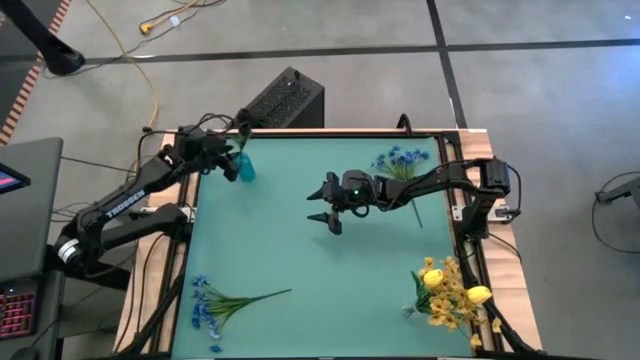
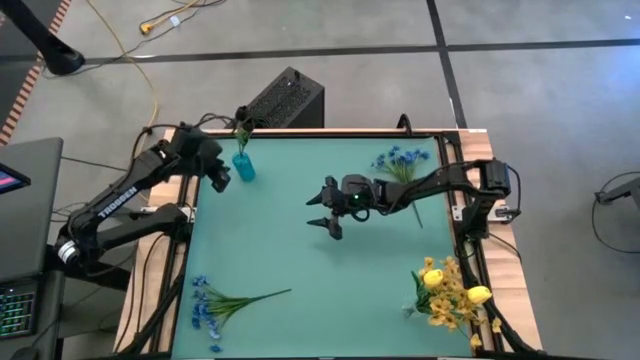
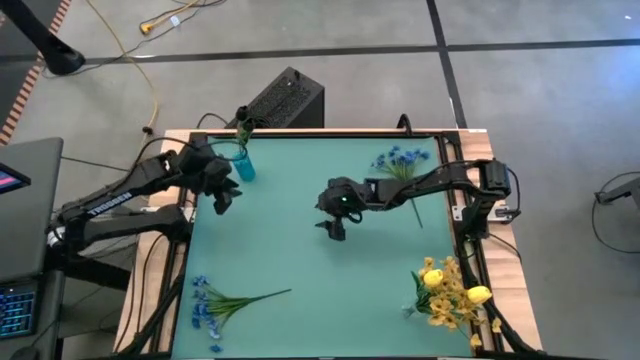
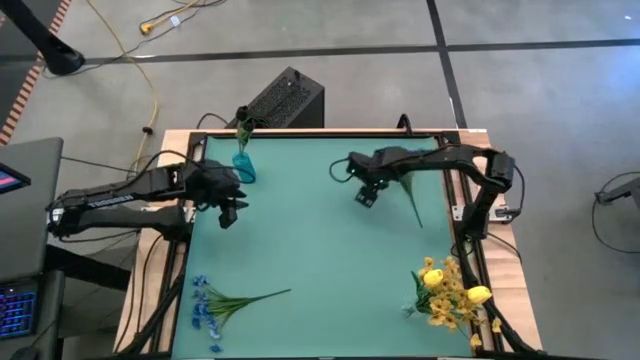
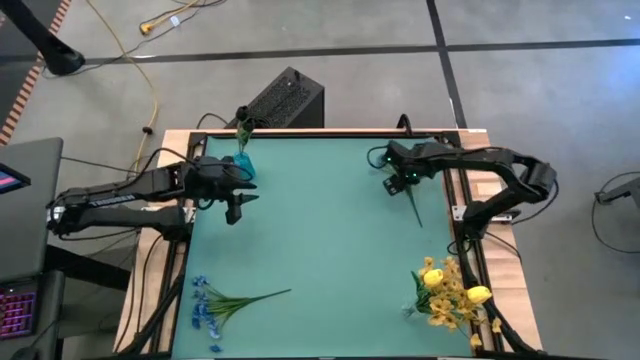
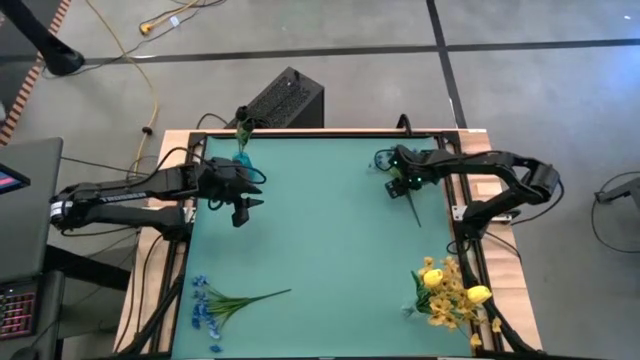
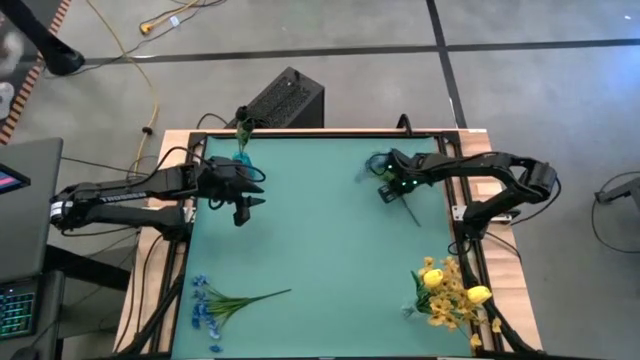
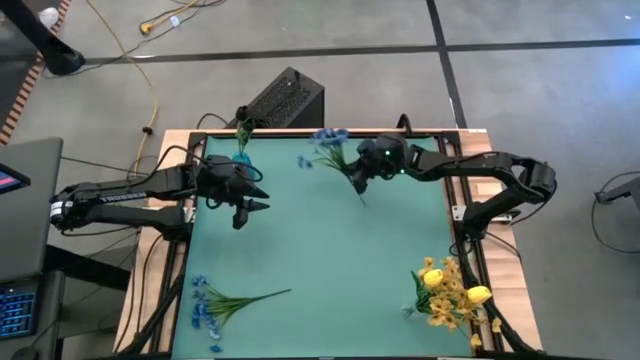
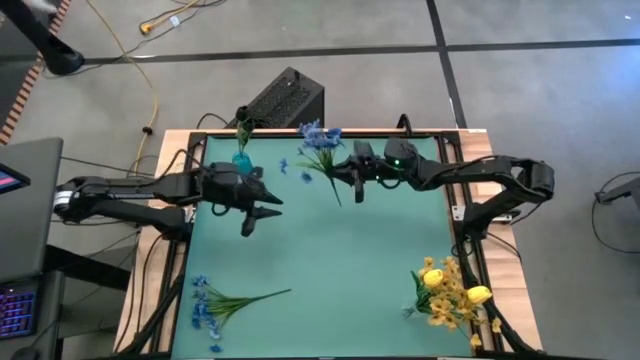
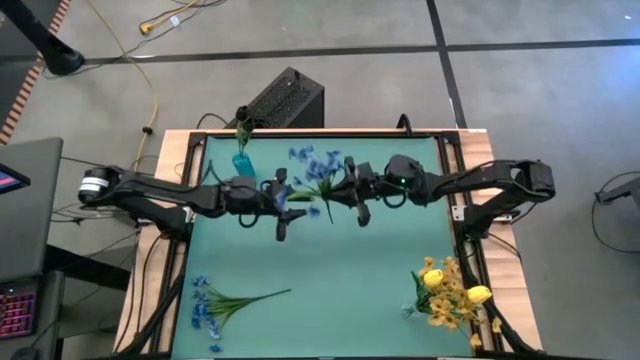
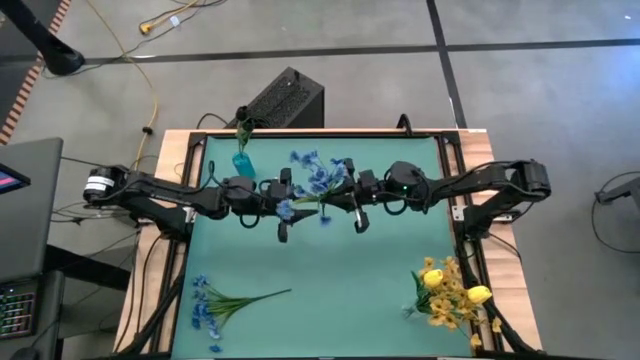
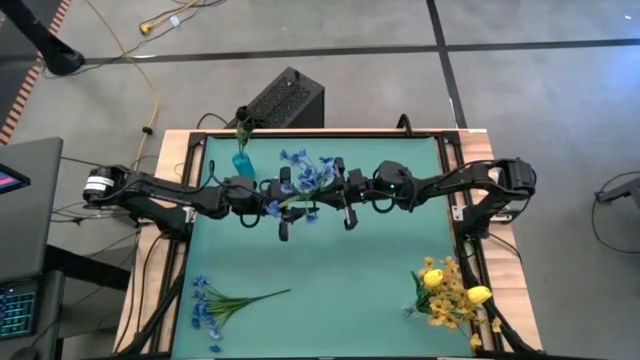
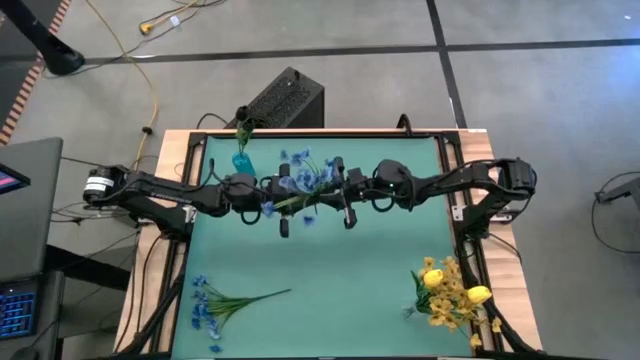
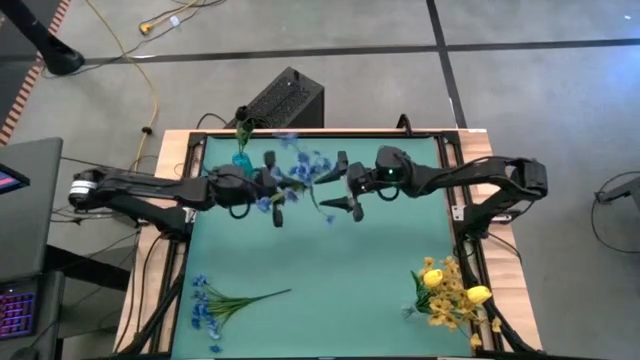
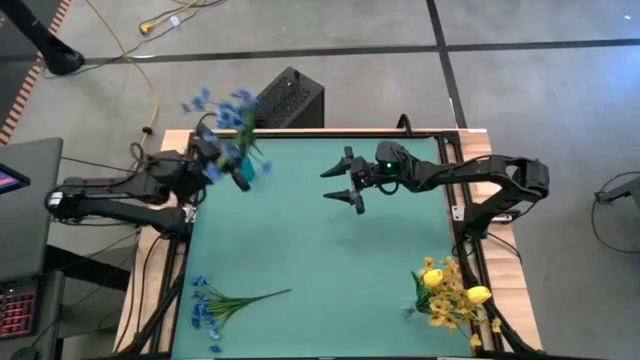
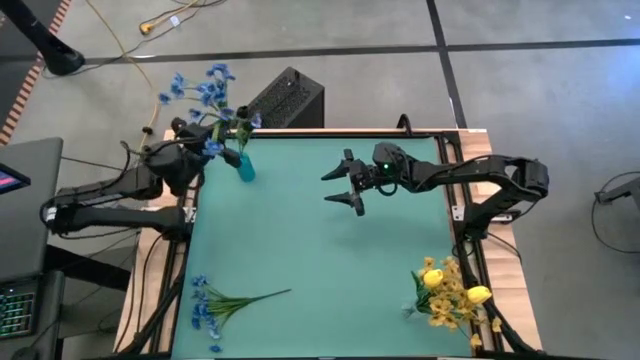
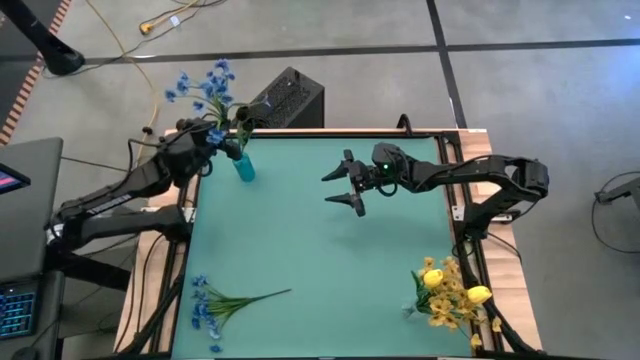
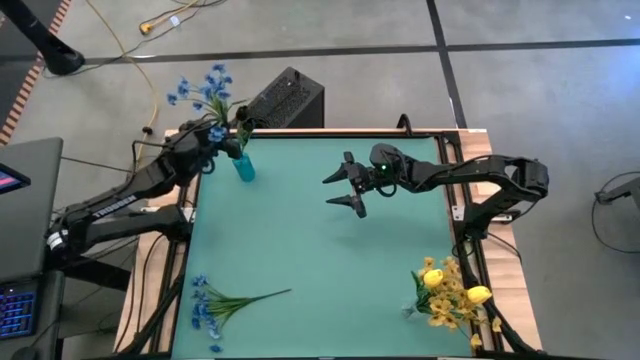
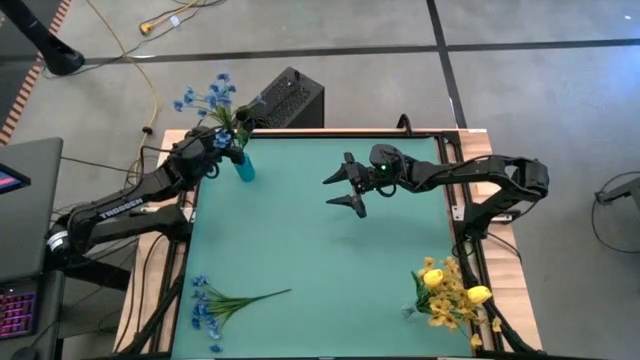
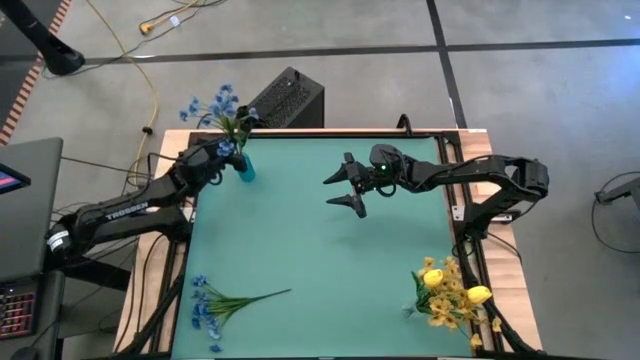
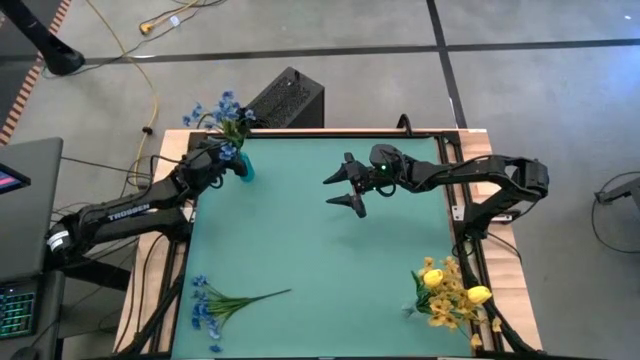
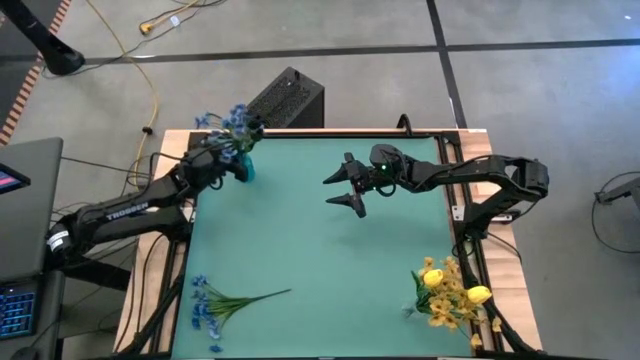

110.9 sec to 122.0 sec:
Task: Sort flowers into vase by color
Put the top blue flower into the blue vase

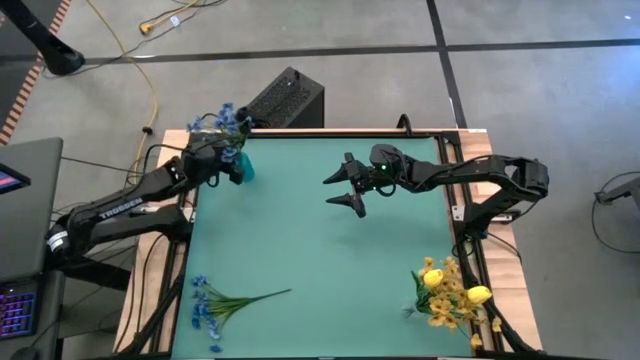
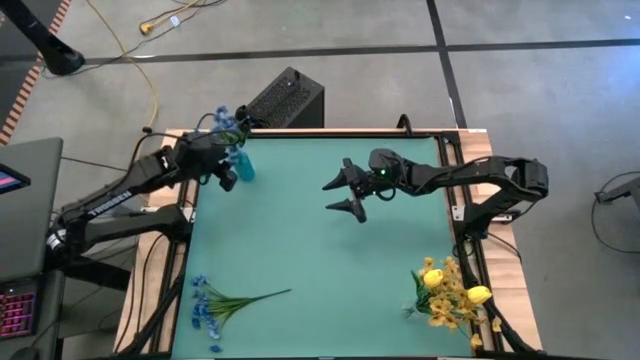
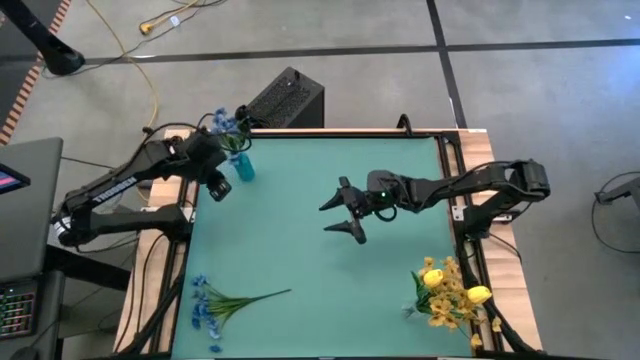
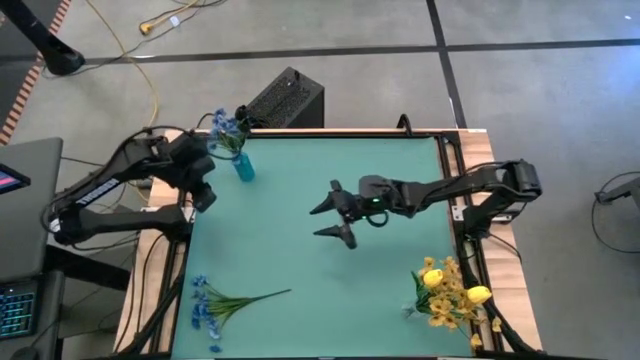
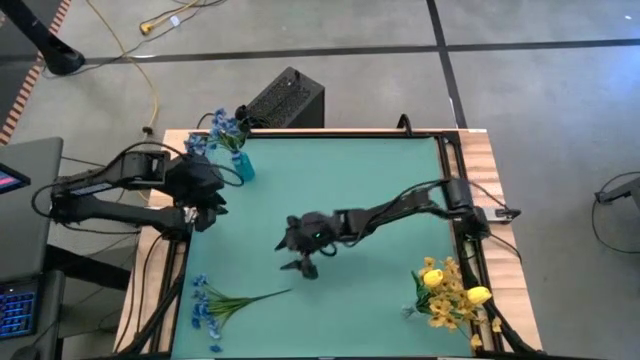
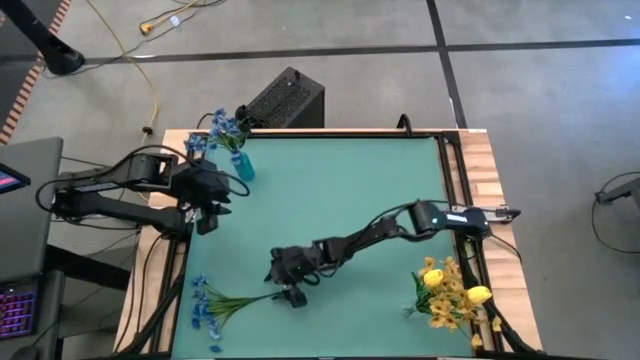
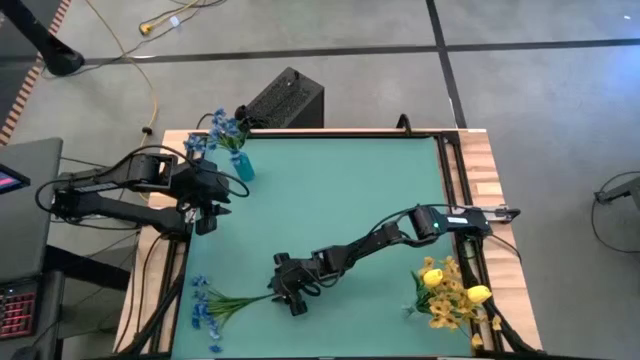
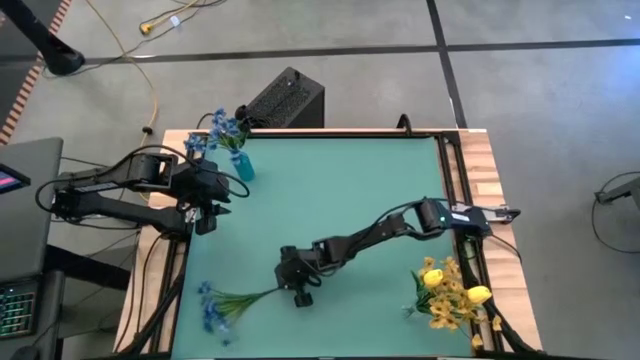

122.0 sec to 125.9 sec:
Put the blue flower into the blue vase

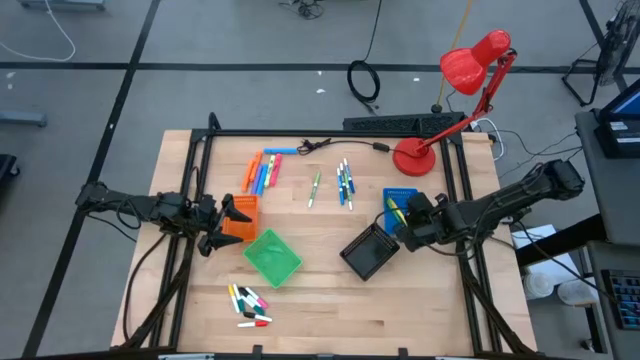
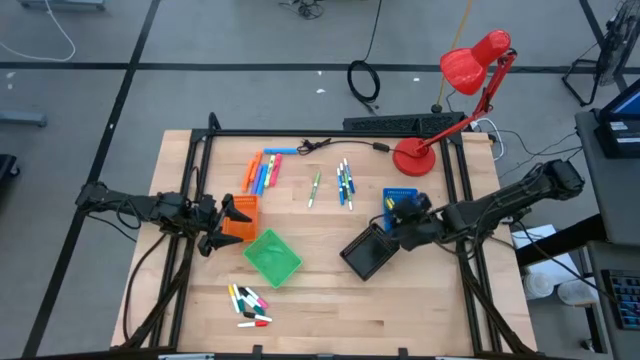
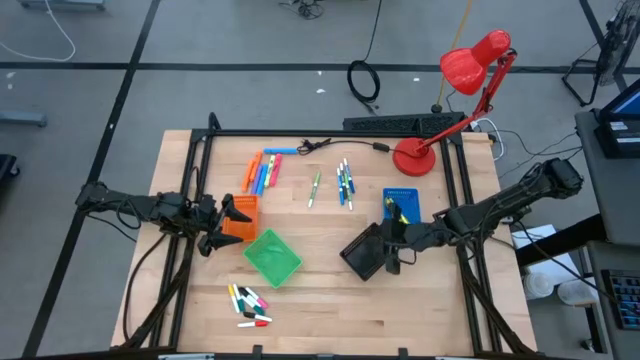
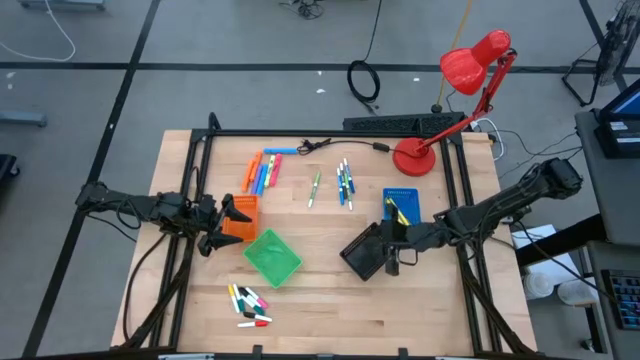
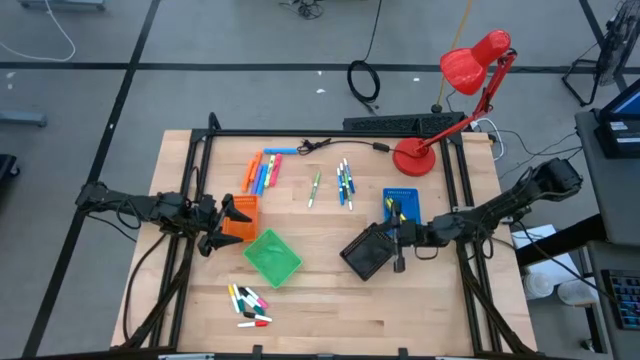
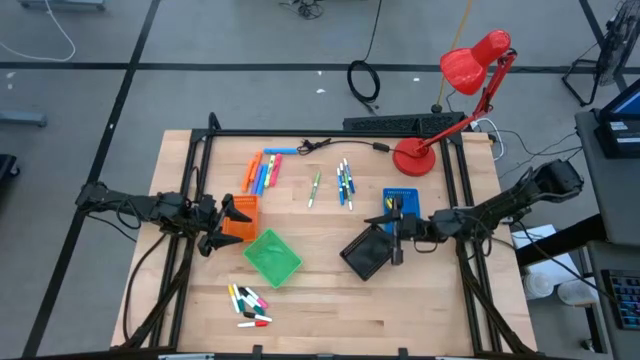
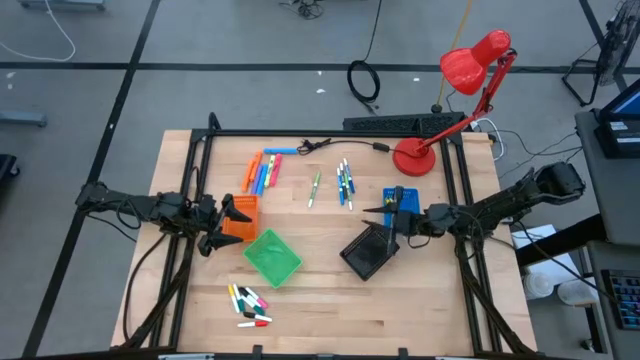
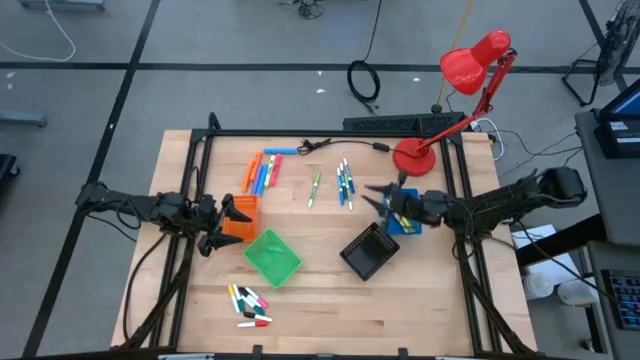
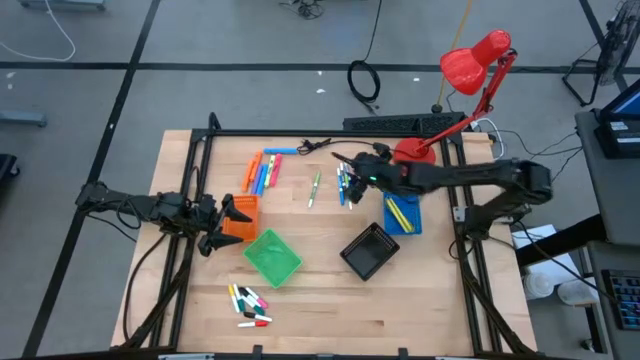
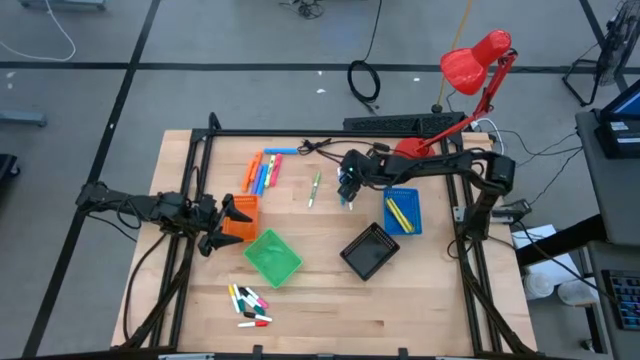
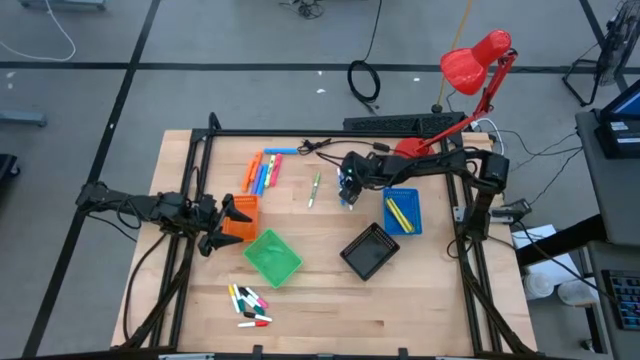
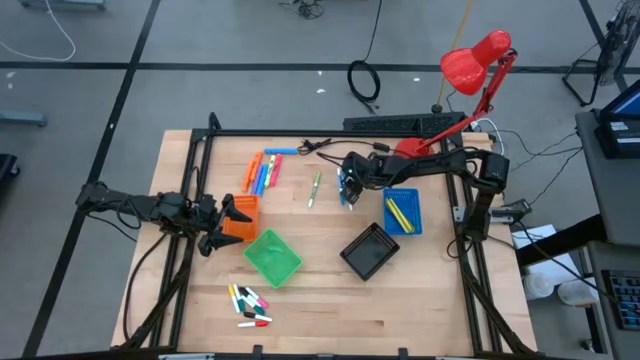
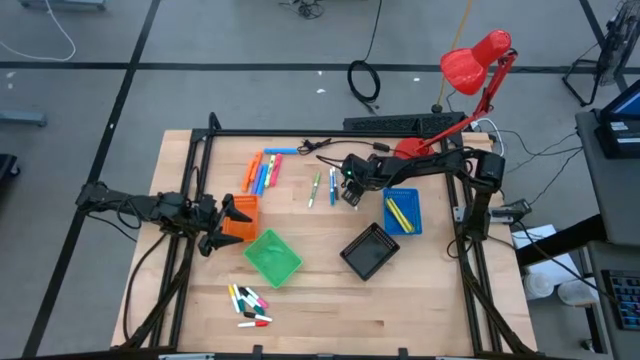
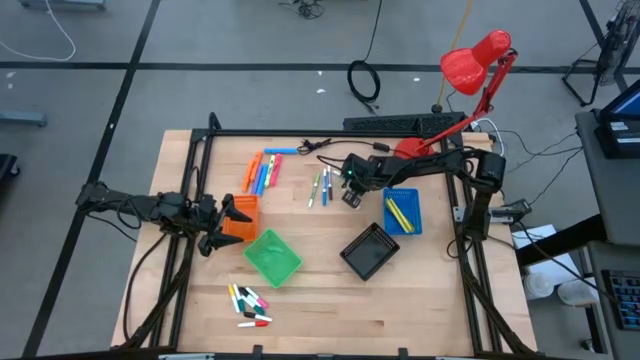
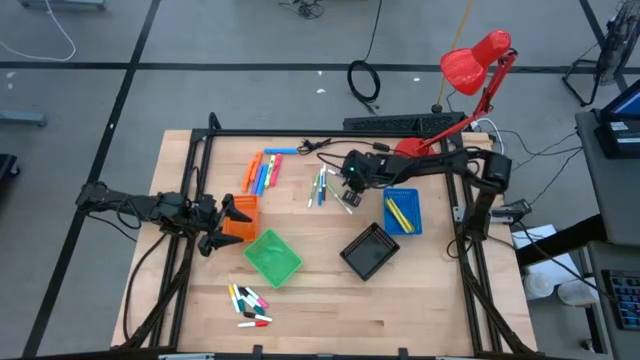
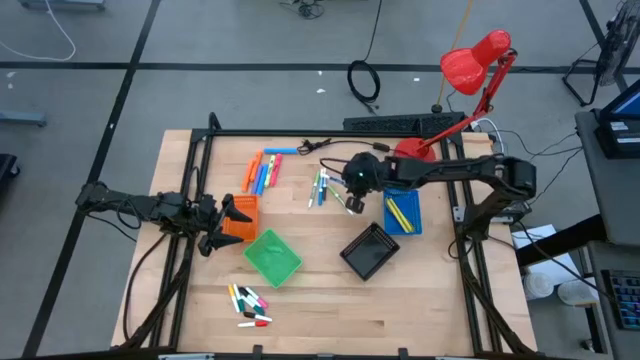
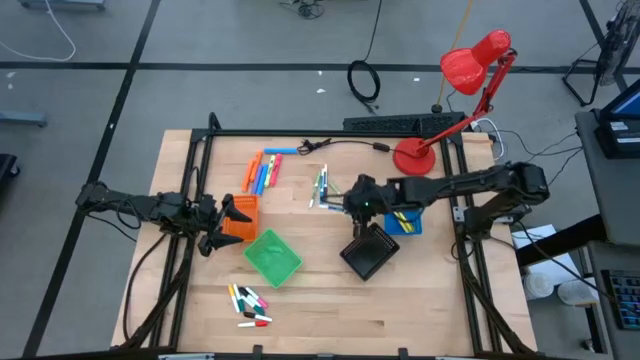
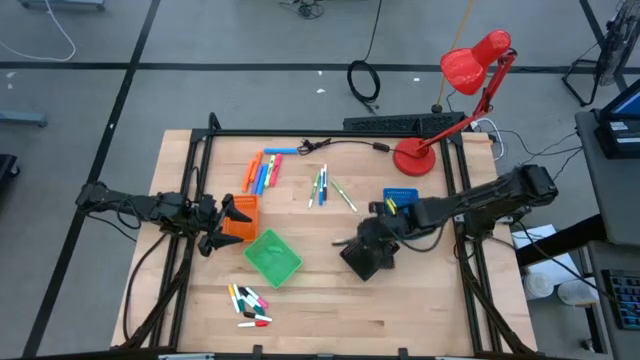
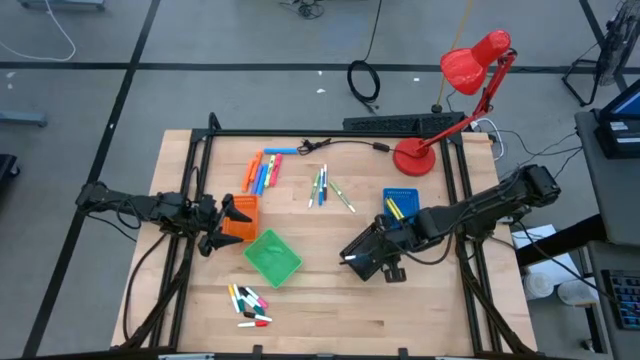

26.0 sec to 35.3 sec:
Task: Pick & Place Markers
Put the blue marker pen into the black basket
